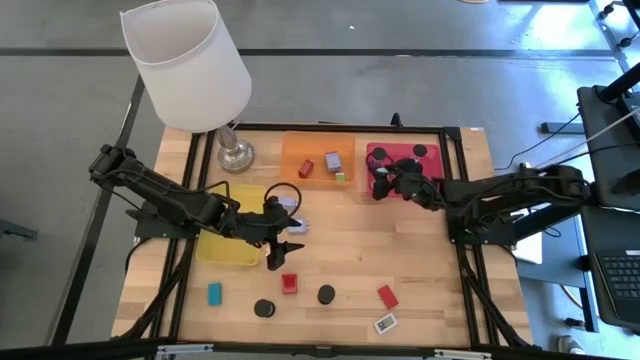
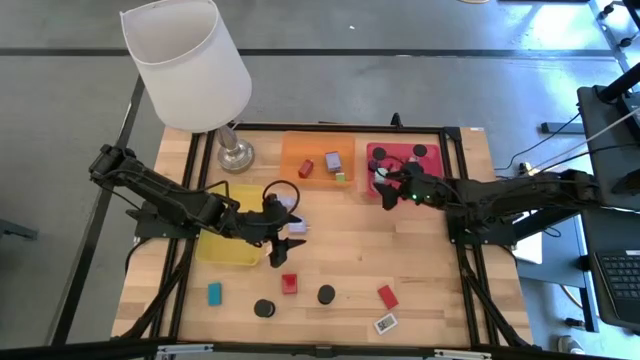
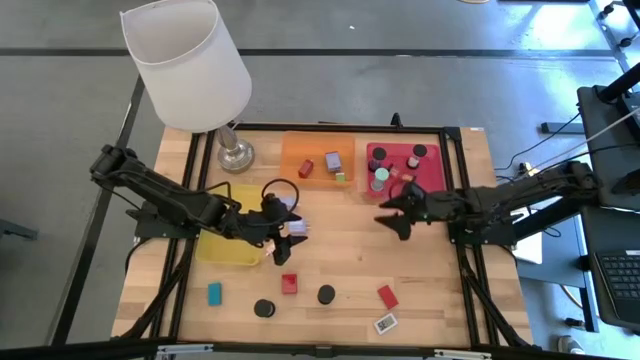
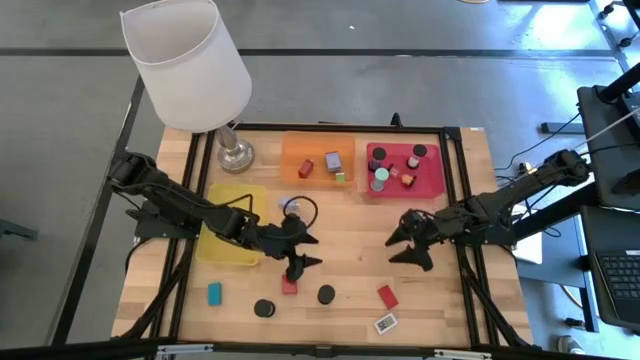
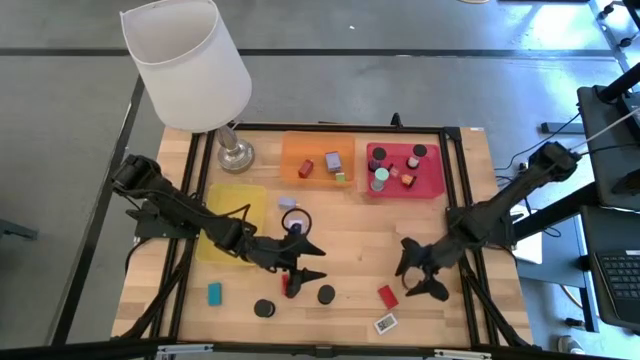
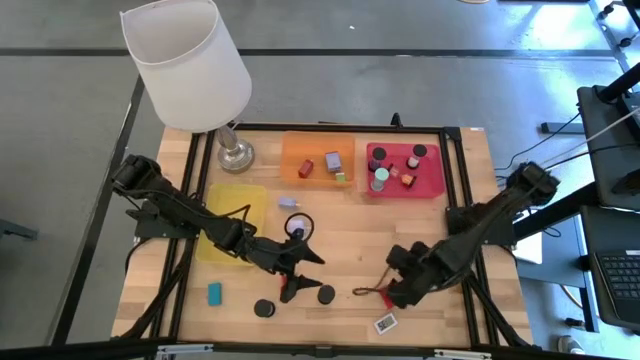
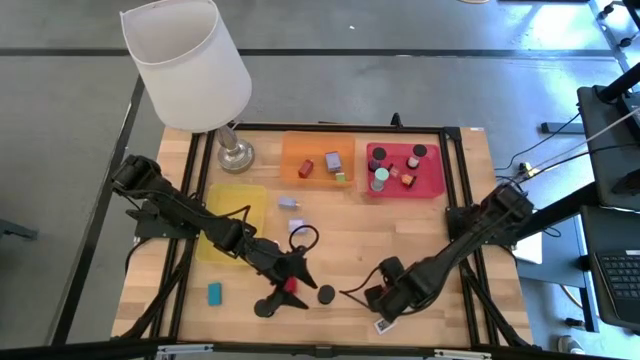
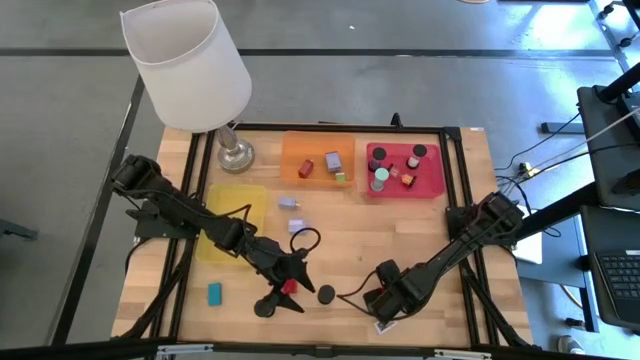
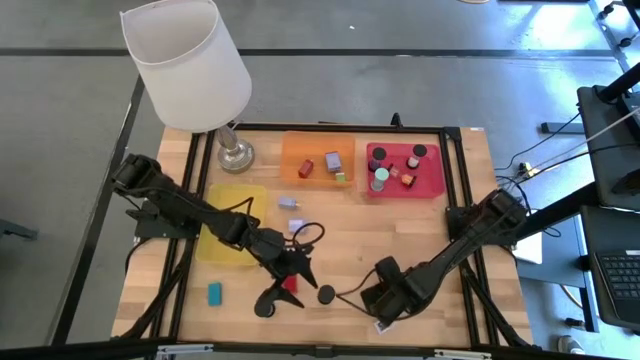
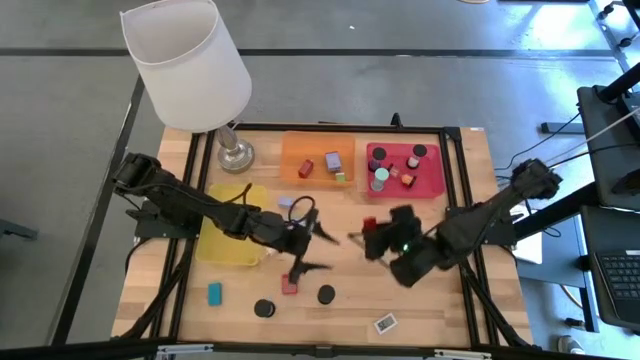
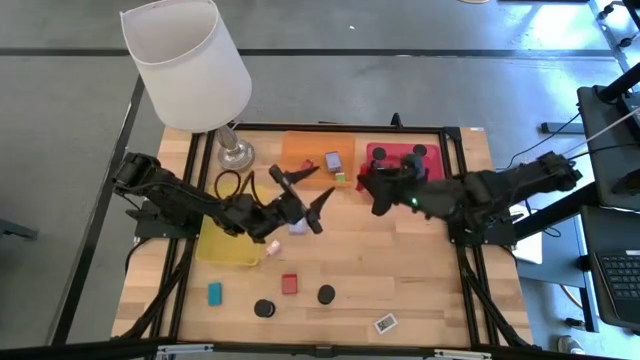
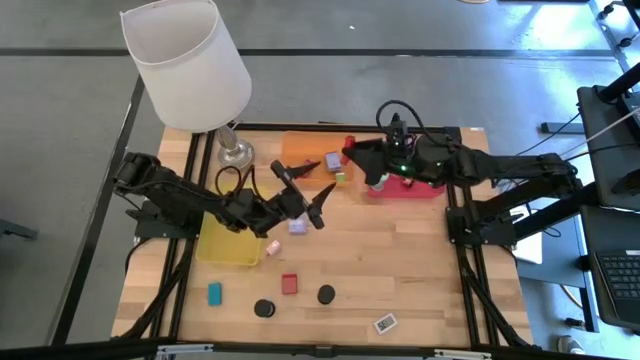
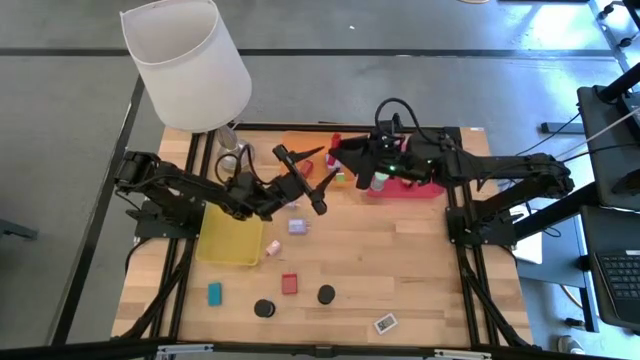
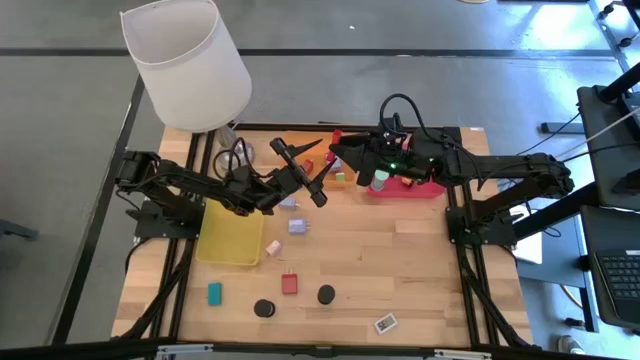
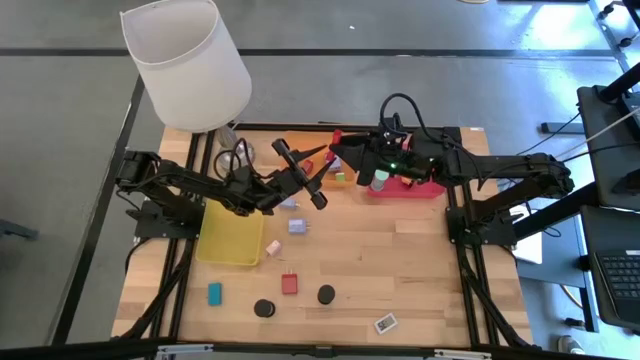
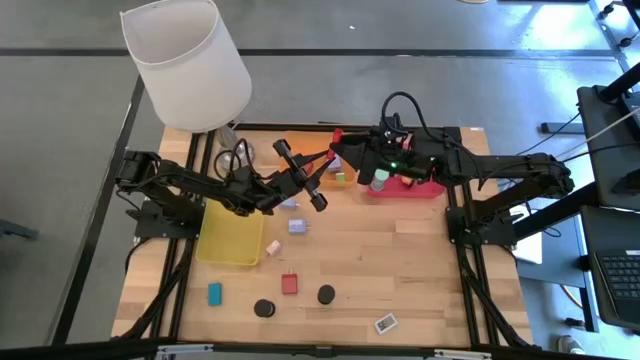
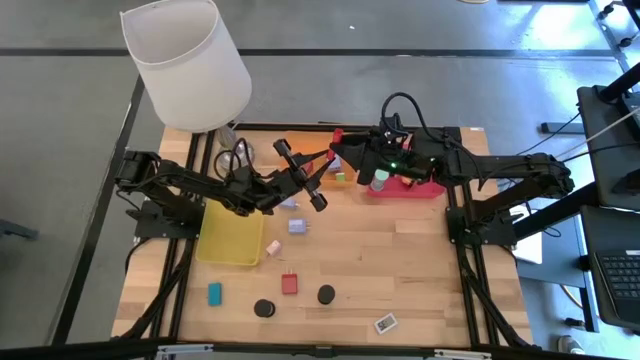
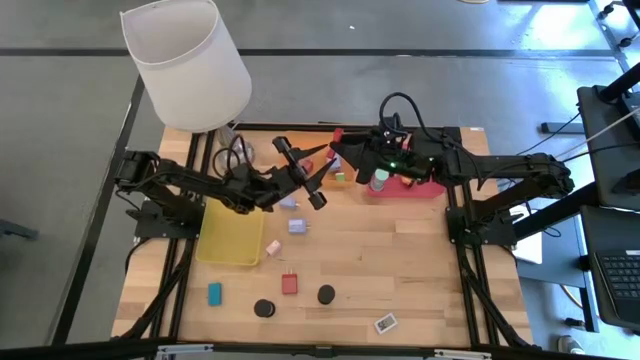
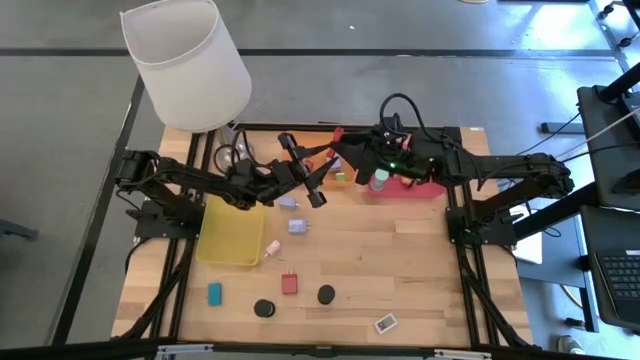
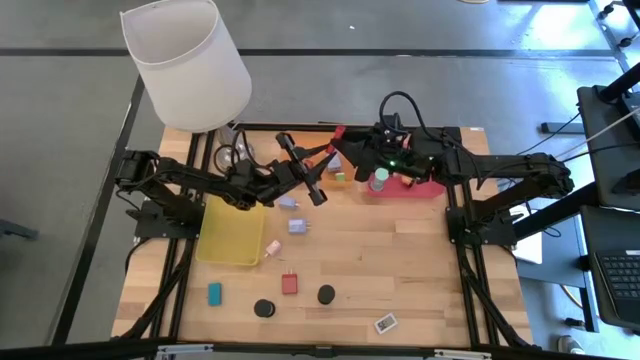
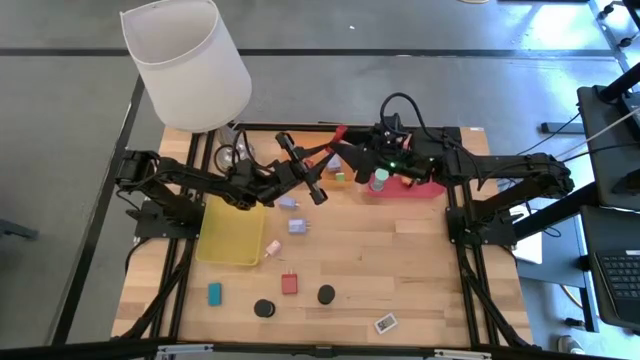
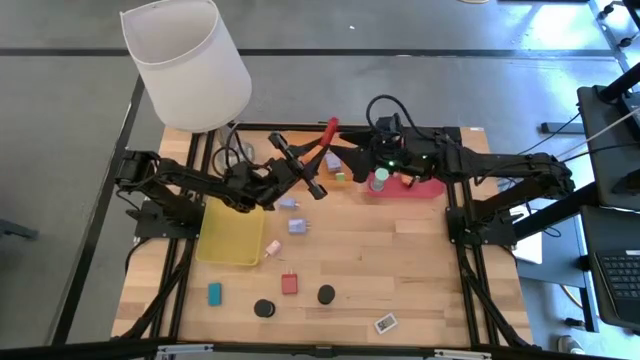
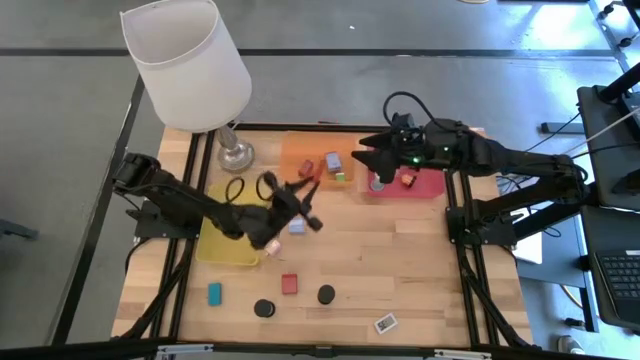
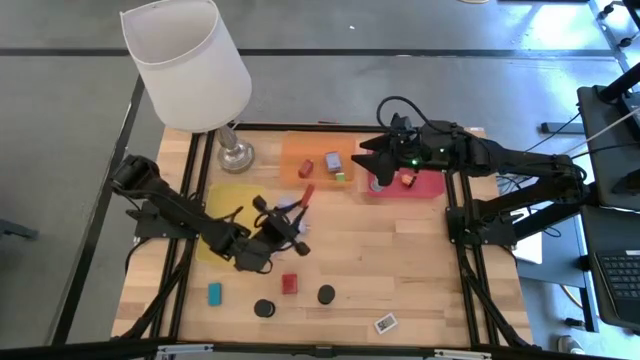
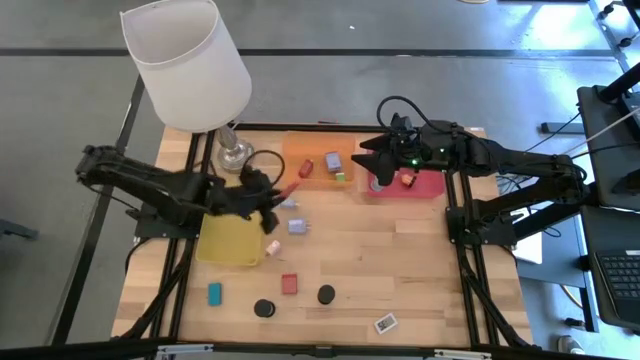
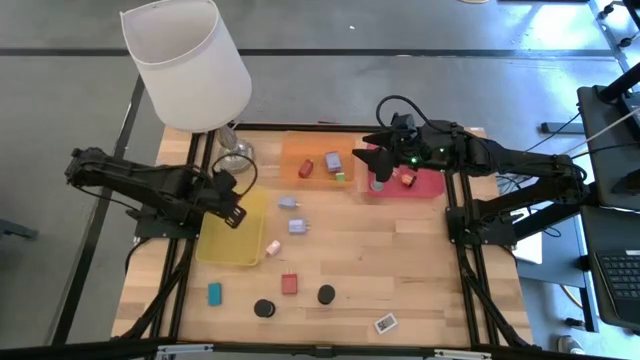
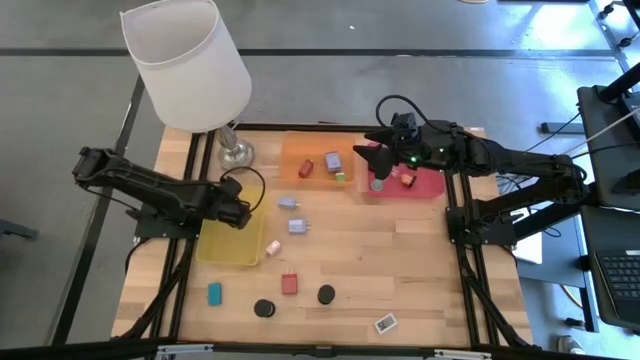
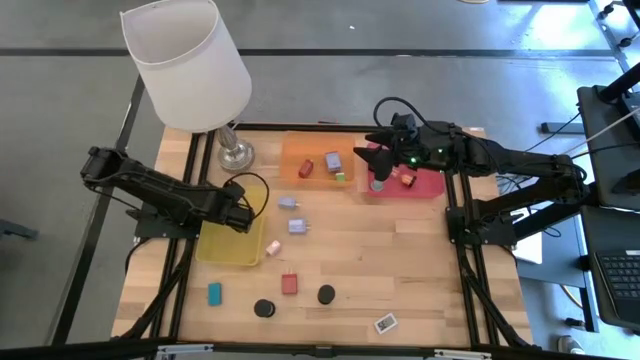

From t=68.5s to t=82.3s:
Task: Pick & Place Office items
Put the red digital timer into the yellow bin

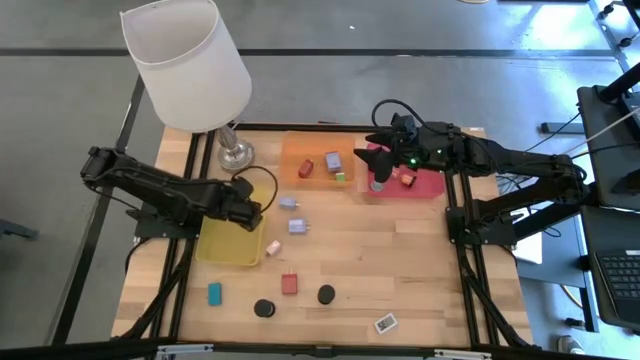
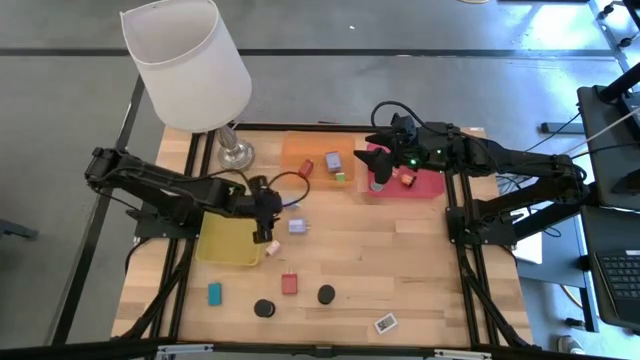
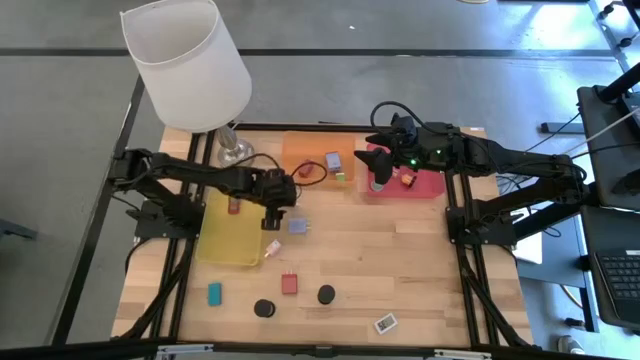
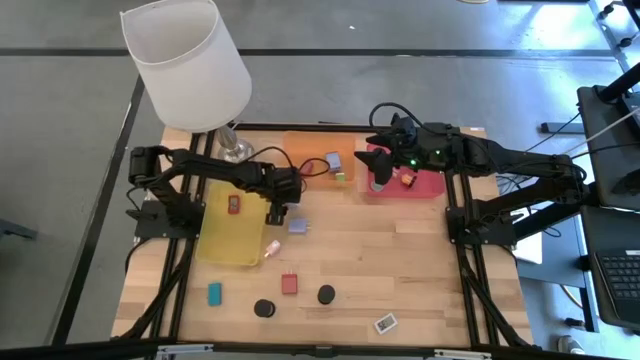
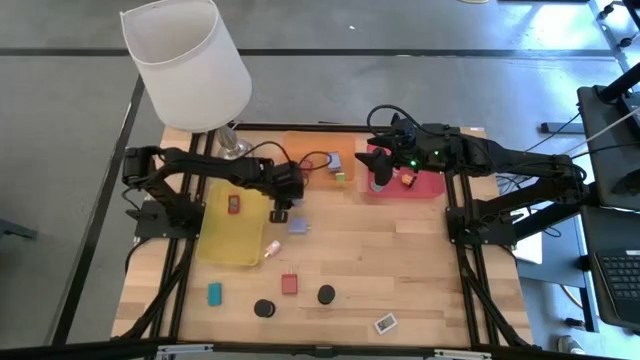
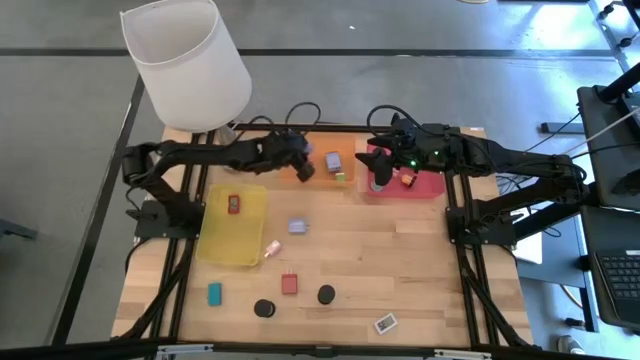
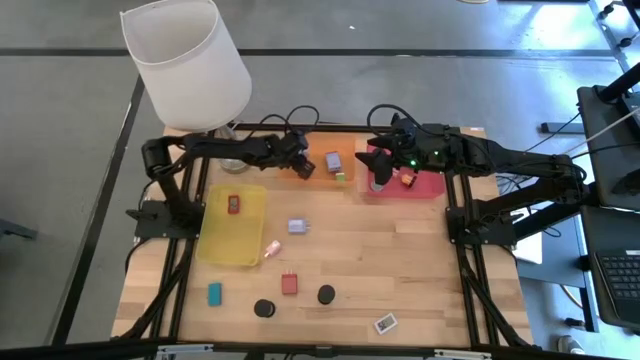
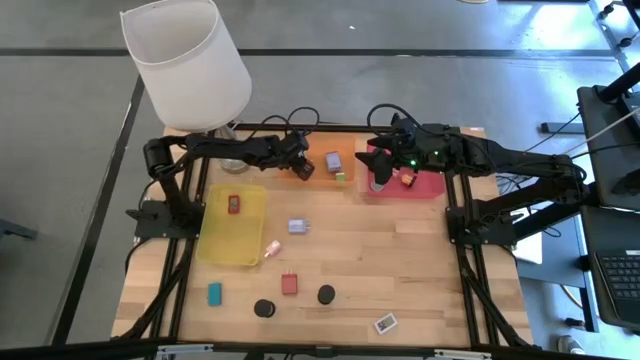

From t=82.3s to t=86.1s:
Put the top blue charger adapter into the orange bin

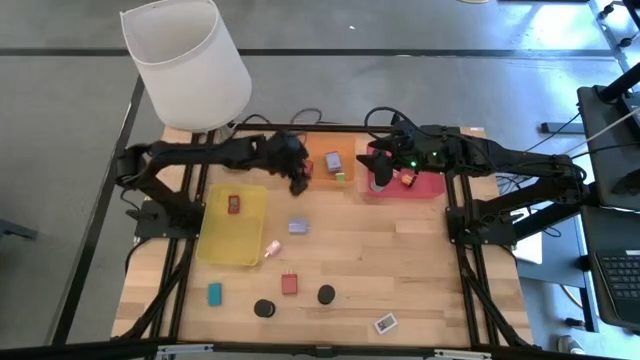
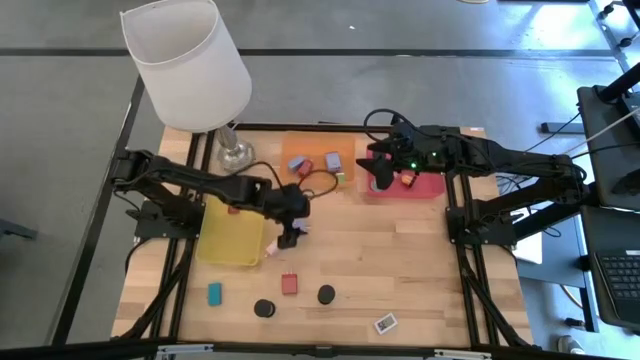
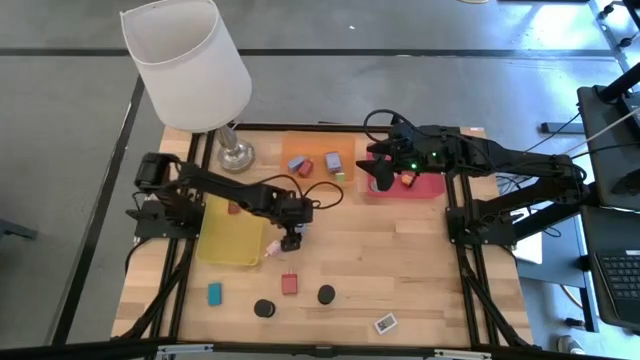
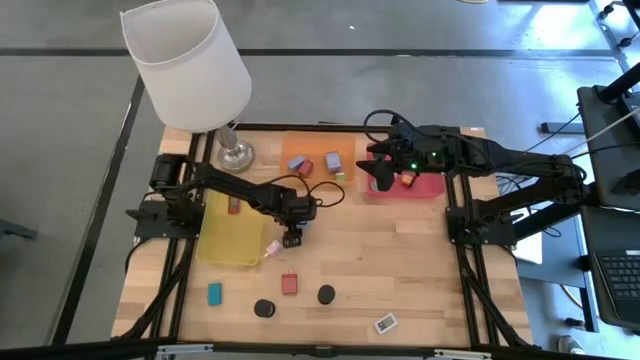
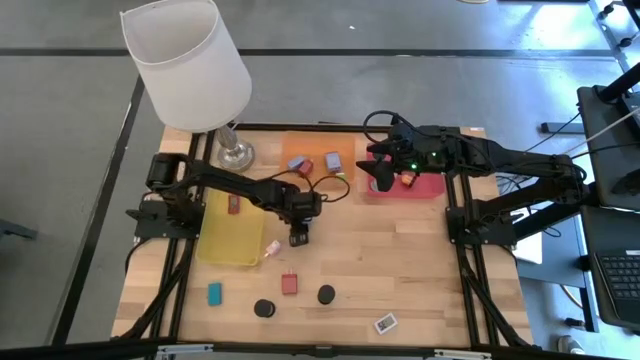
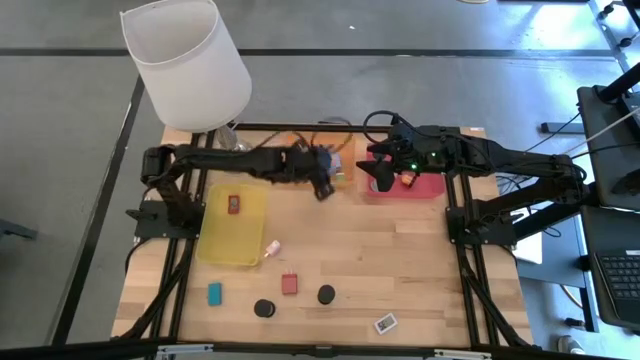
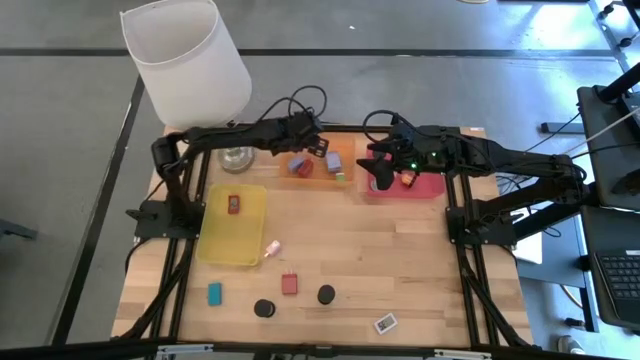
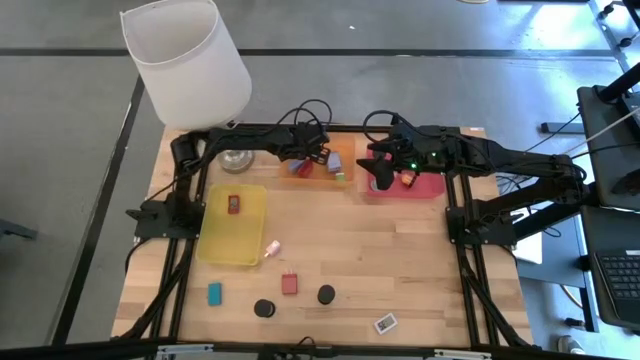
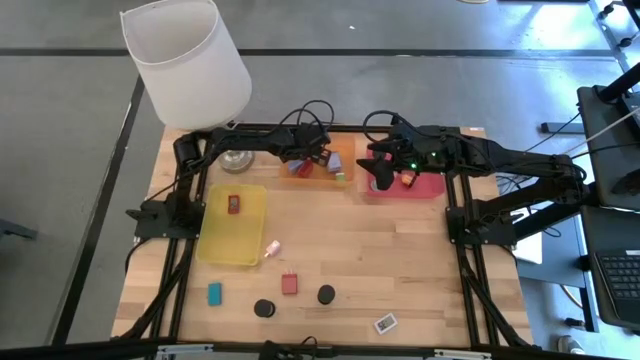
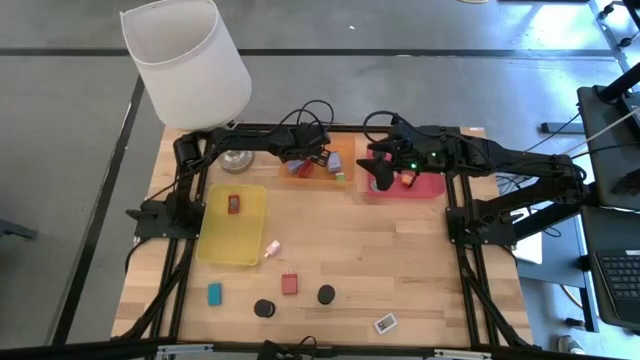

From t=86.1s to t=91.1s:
Put the blue charger adapter into the orange bin
